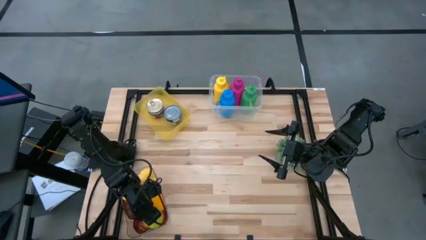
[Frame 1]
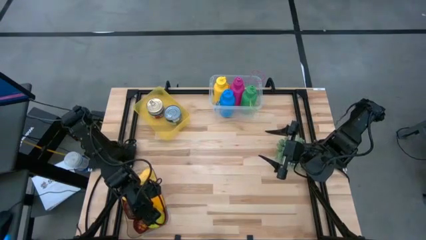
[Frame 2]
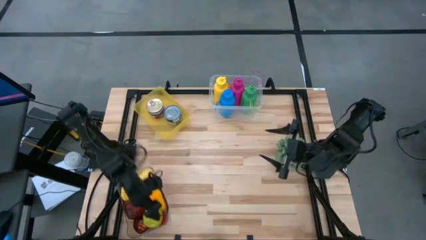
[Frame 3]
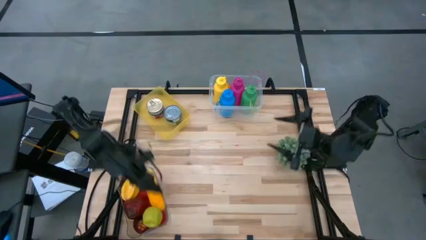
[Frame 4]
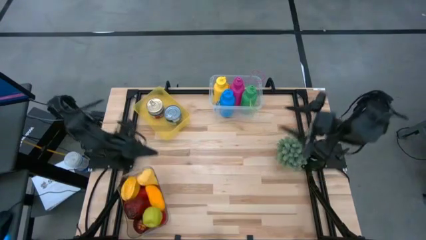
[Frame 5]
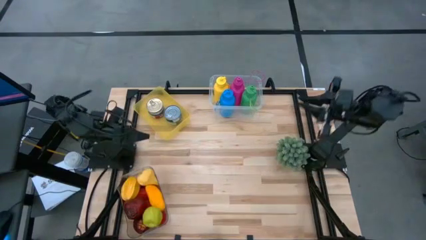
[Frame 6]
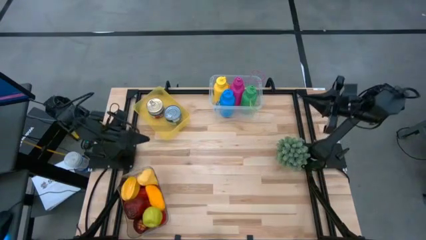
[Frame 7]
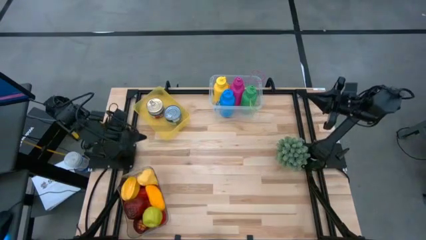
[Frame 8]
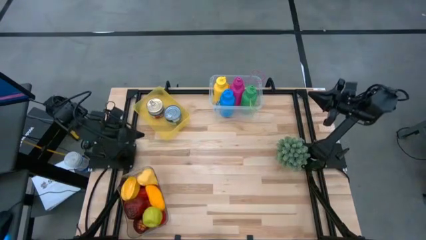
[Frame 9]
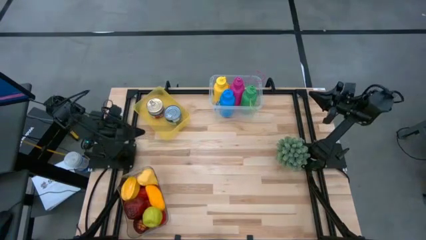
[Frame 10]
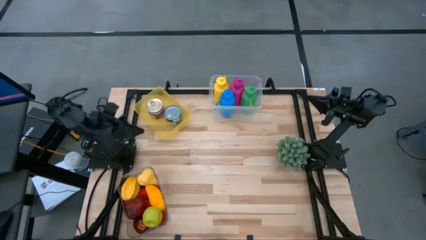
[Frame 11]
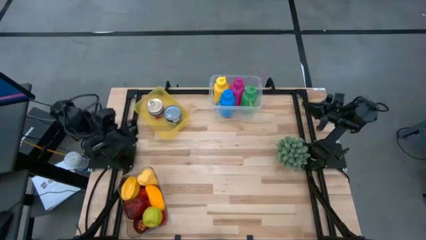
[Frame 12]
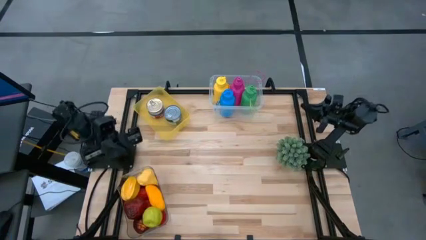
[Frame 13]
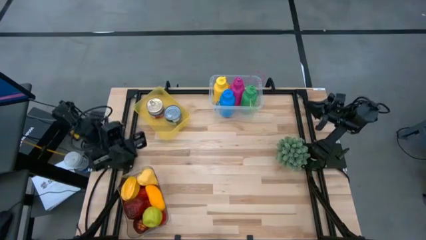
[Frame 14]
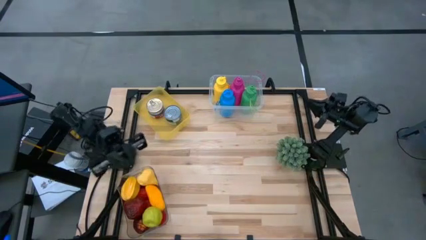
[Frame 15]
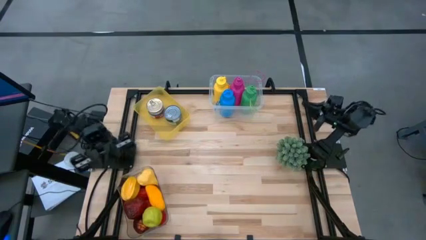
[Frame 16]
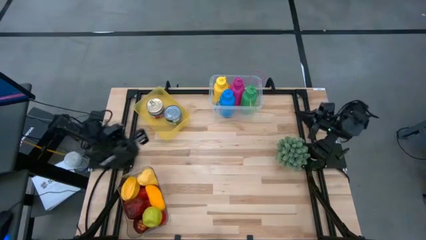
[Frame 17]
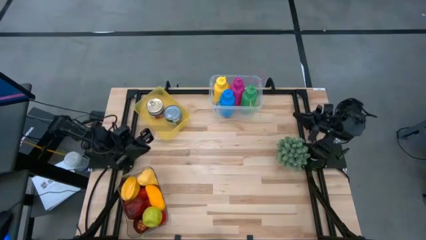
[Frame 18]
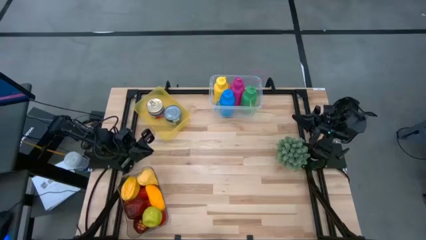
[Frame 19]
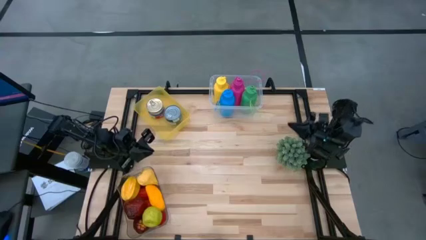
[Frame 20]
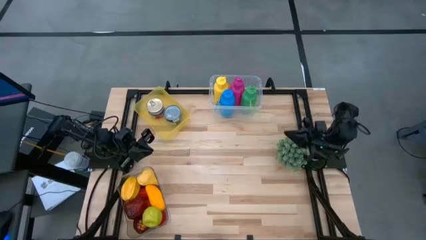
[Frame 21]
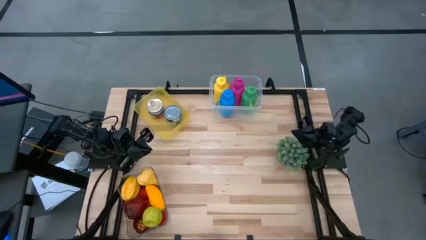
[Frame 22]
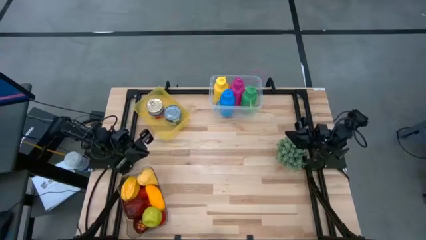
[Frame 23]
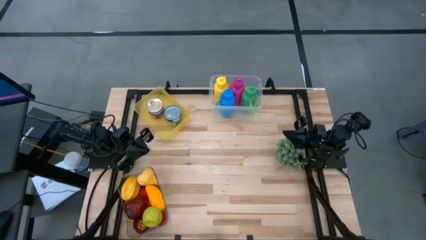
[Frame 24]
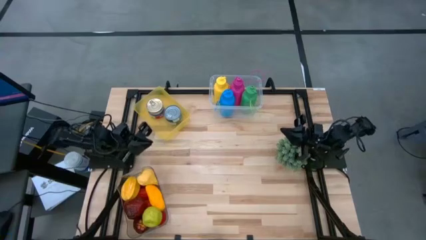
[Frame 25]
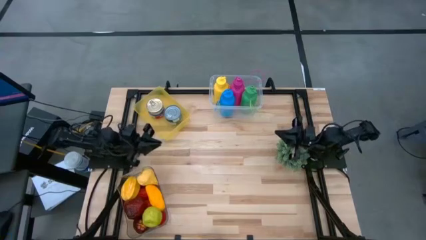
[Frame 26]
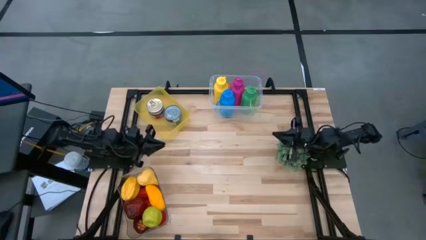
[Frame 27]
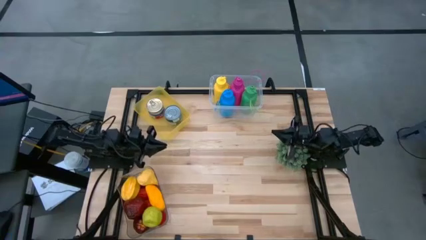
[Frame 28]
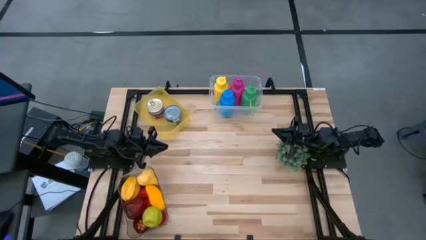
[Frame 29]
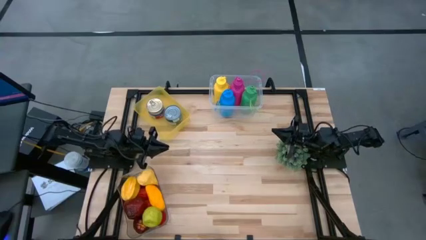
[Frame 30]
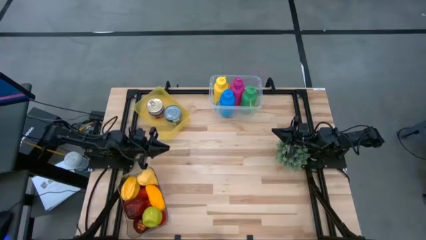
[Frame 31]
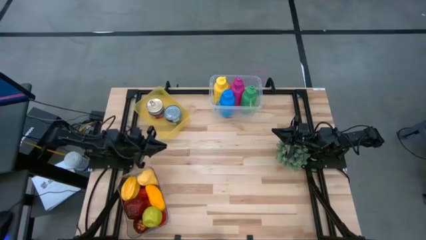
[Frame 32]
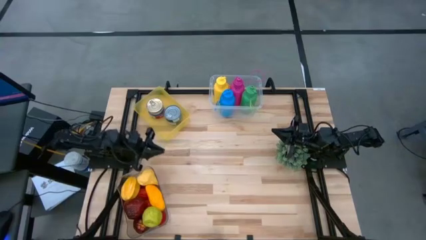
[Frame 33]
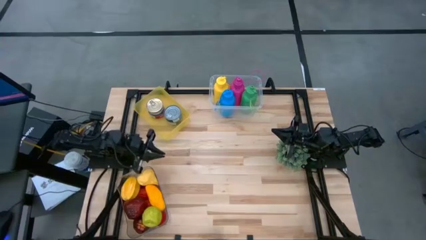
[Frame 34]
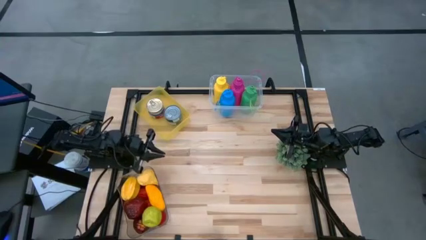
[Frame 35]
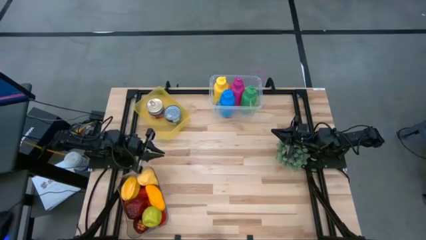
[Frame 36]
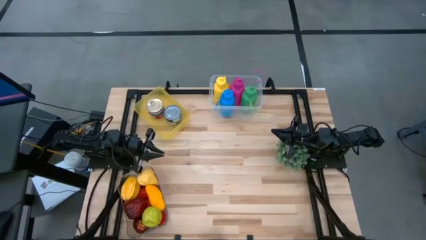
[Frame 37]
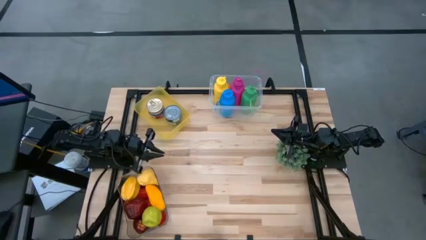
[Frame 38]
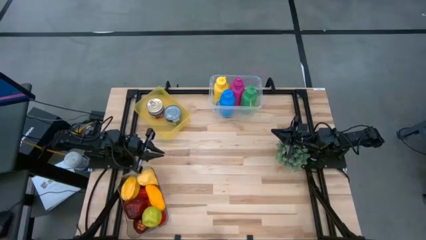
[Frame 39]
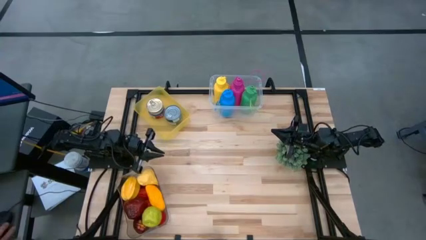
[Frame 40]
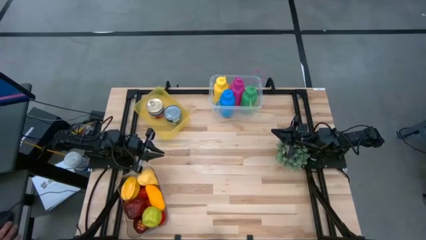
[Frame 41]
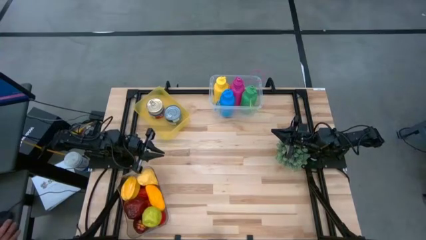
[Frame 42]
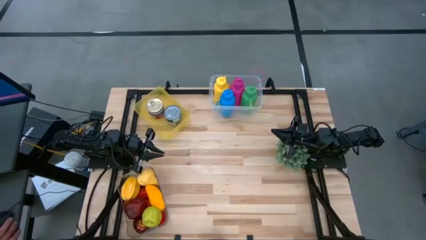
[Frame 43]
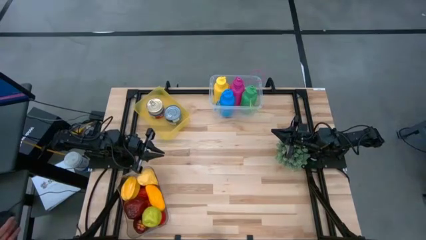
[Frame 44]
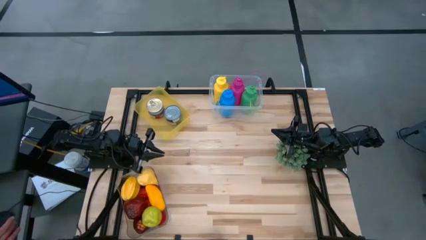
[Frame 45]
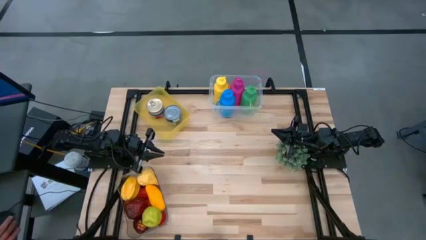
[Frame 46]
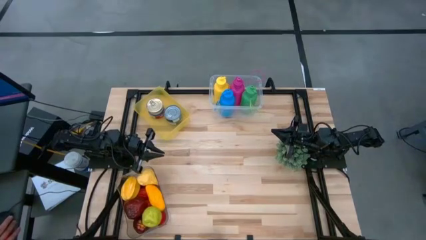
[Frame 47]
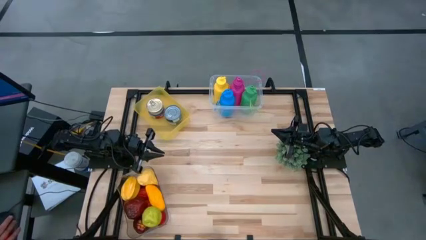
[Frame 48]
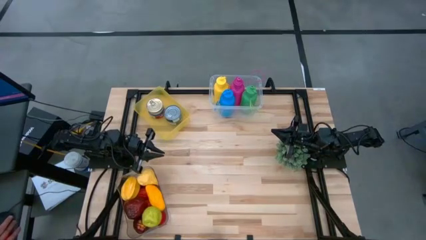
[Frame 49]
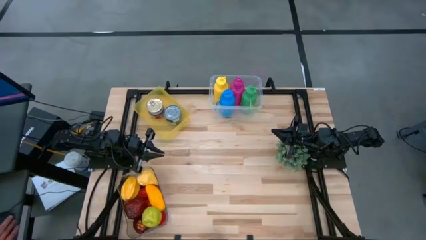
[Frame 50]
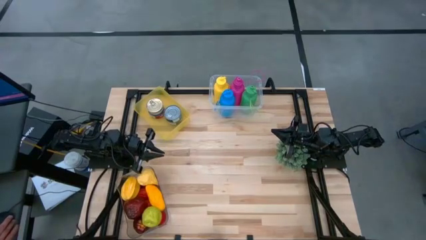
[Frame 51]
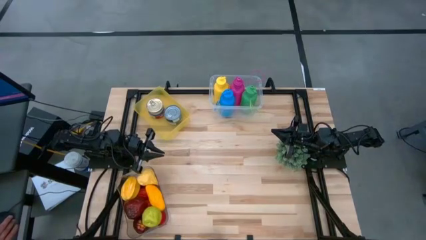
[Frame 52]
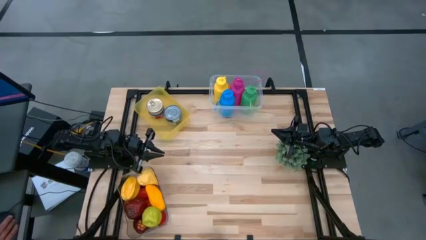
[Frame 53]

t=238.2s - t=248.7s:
Task: Pick & Place Food Item
Return to Home Position
